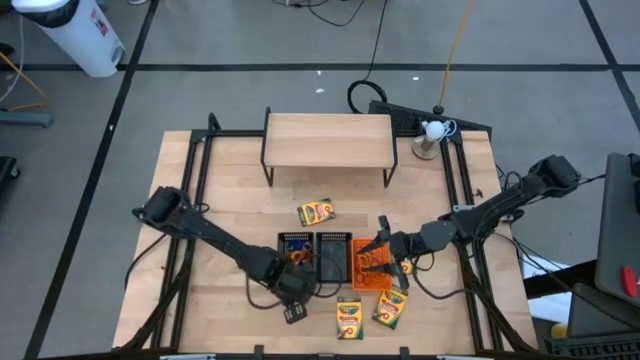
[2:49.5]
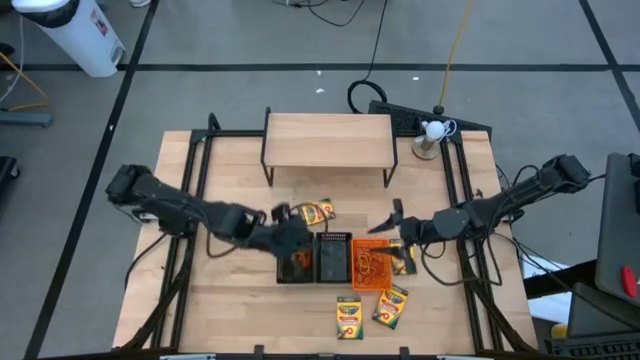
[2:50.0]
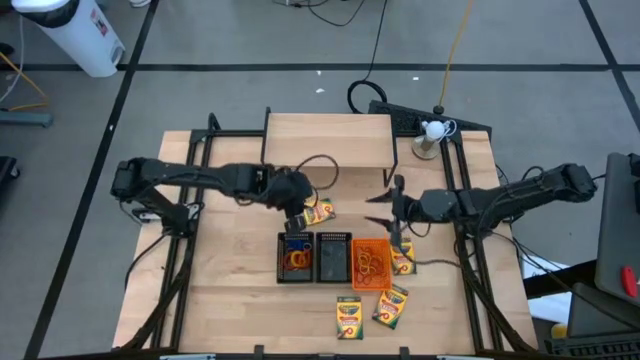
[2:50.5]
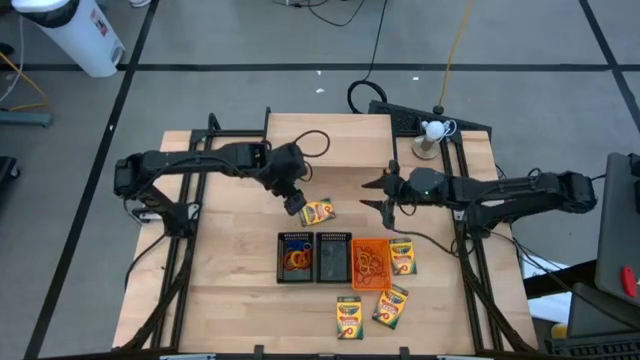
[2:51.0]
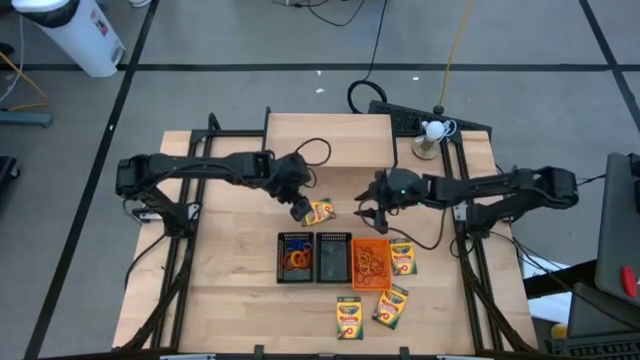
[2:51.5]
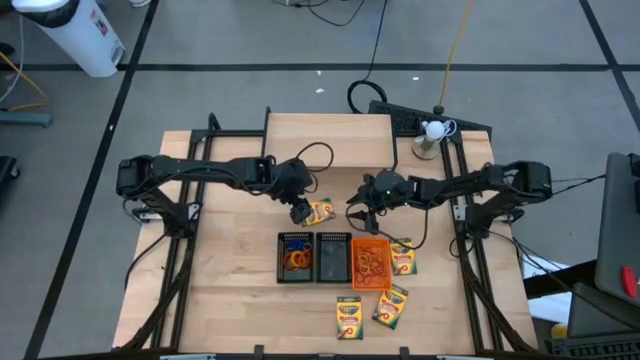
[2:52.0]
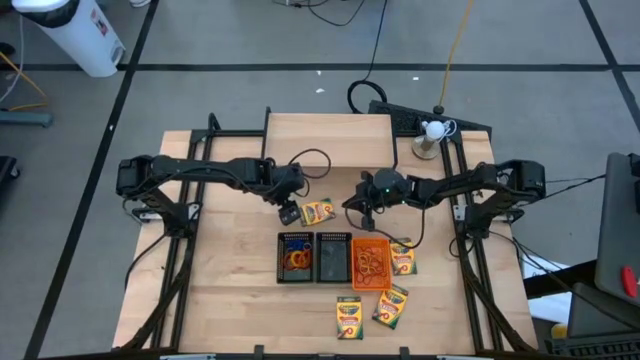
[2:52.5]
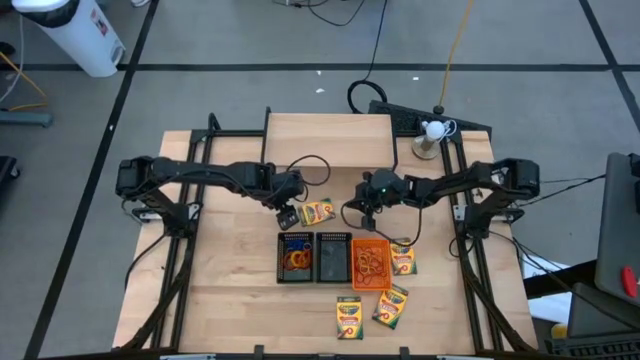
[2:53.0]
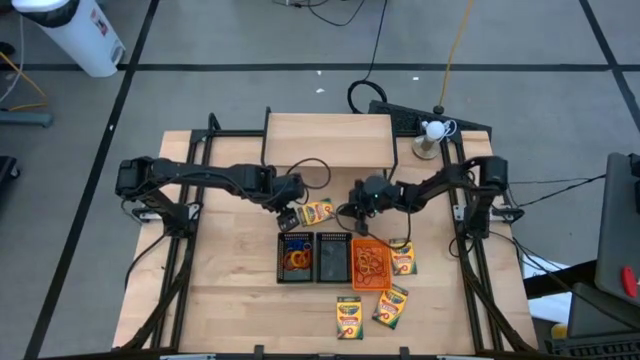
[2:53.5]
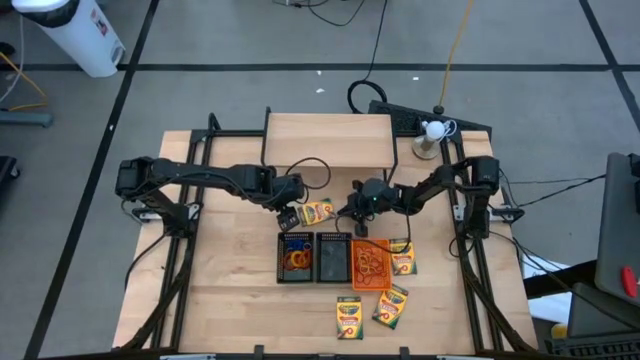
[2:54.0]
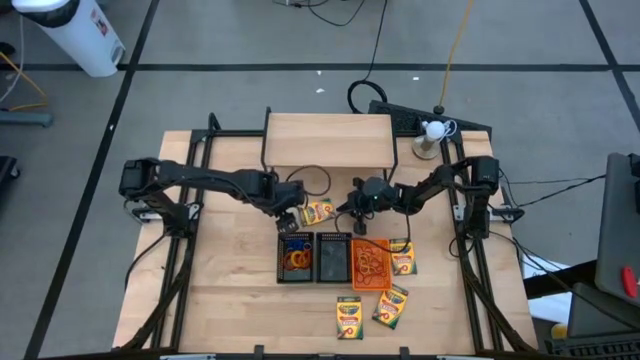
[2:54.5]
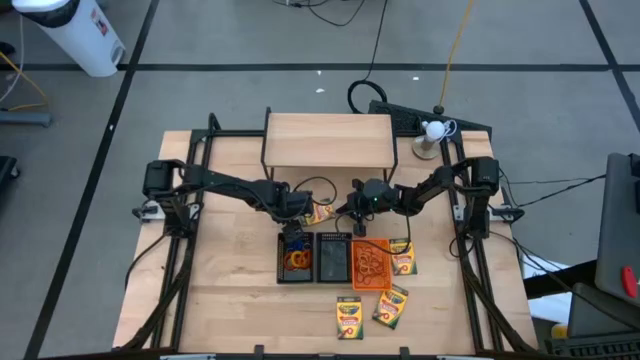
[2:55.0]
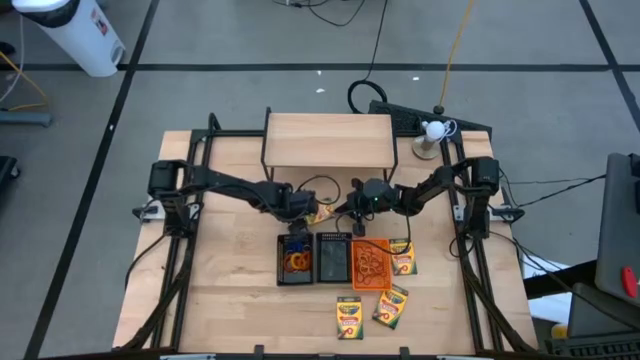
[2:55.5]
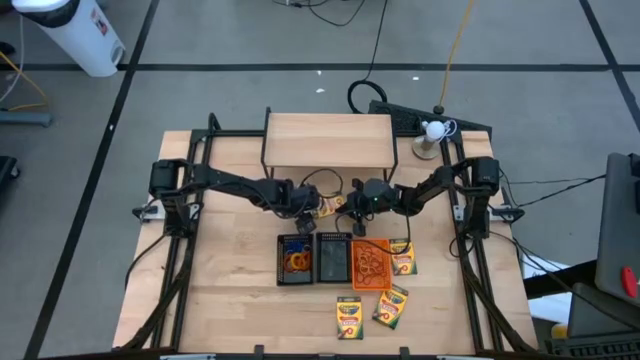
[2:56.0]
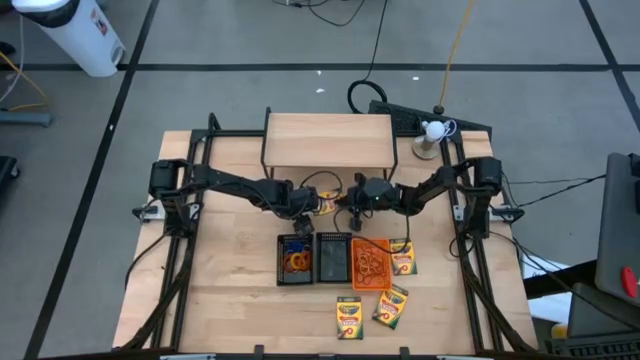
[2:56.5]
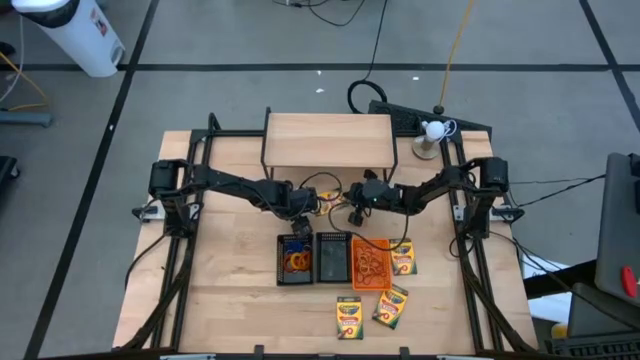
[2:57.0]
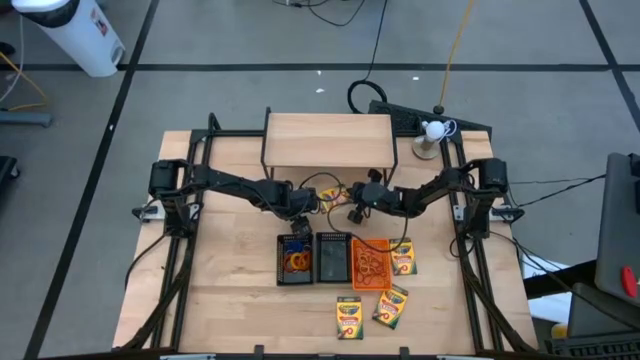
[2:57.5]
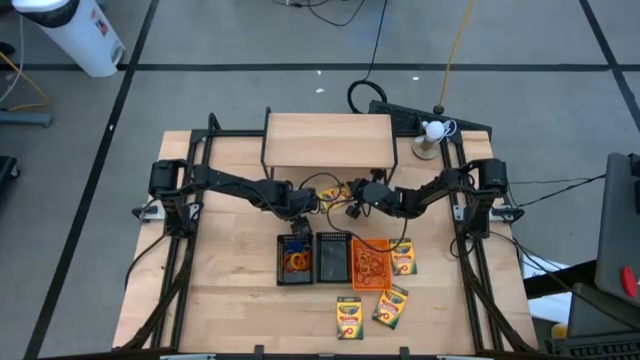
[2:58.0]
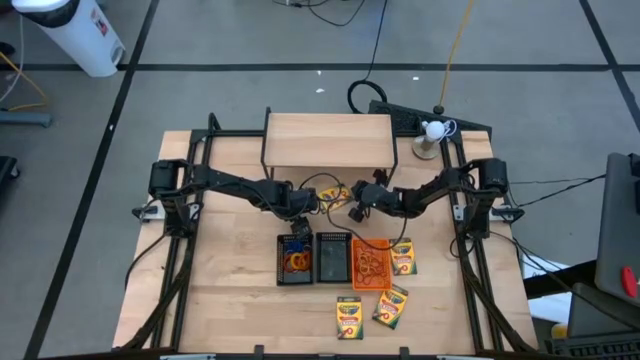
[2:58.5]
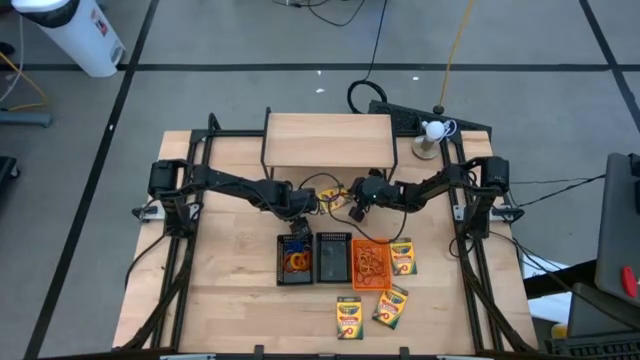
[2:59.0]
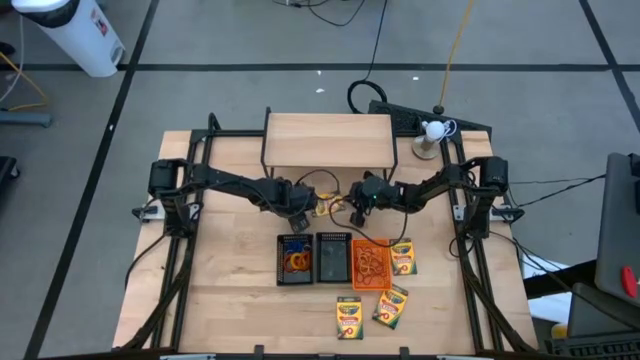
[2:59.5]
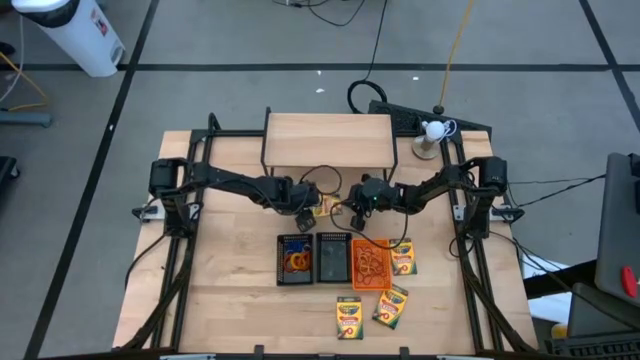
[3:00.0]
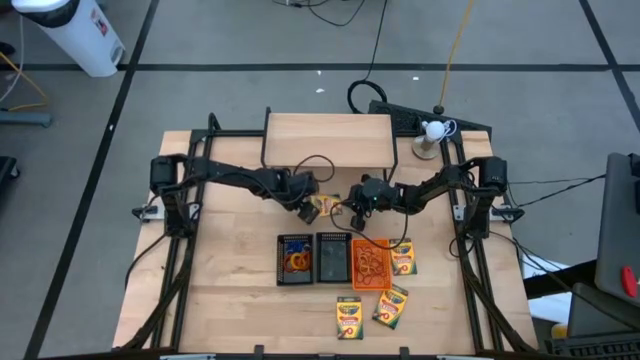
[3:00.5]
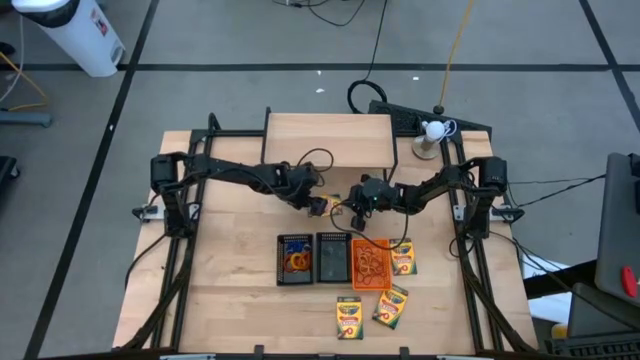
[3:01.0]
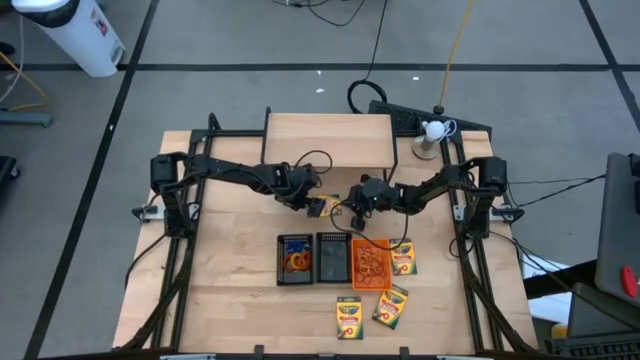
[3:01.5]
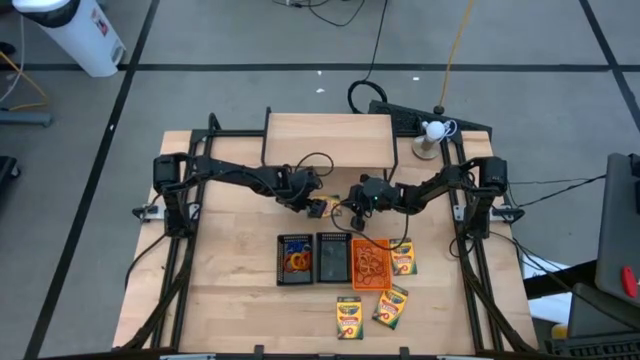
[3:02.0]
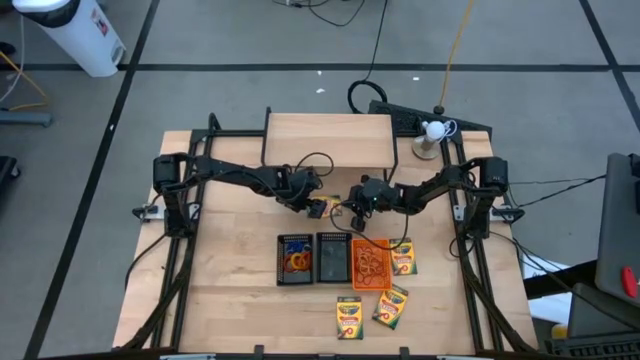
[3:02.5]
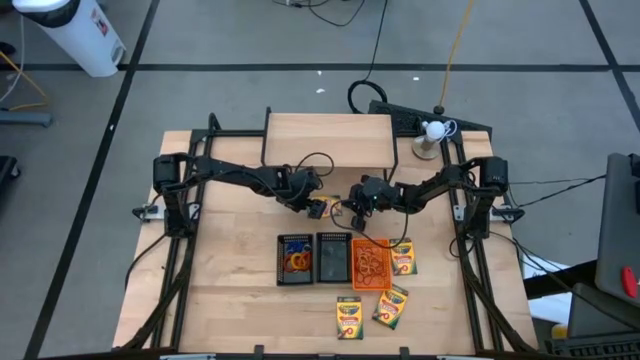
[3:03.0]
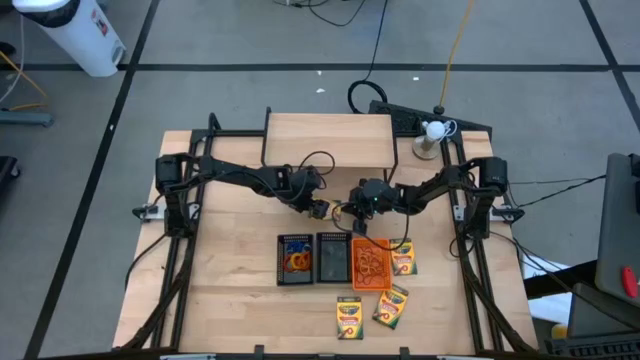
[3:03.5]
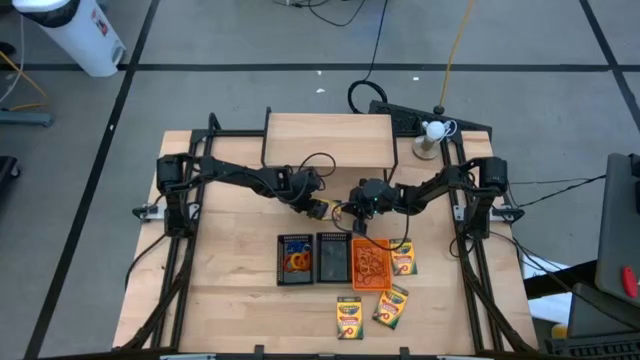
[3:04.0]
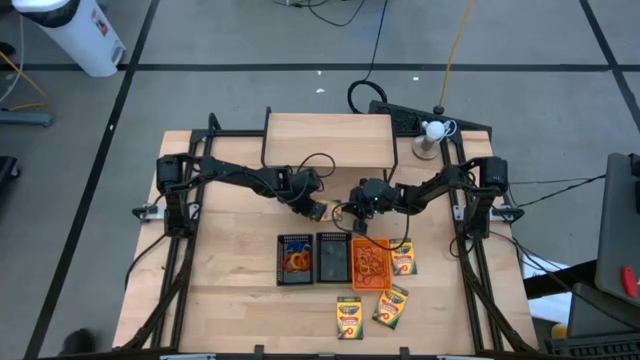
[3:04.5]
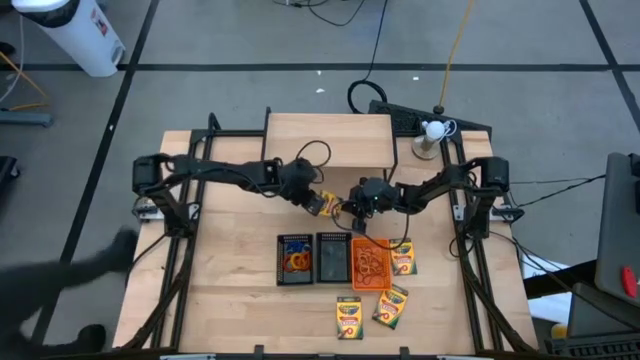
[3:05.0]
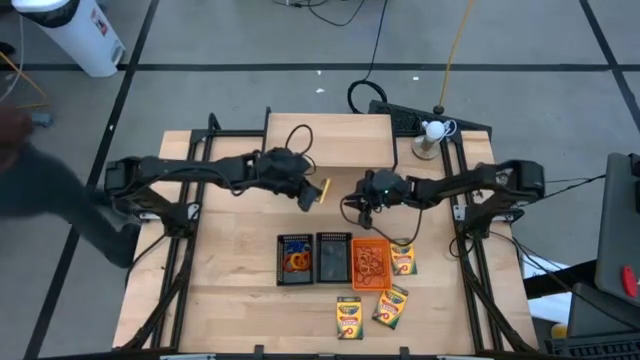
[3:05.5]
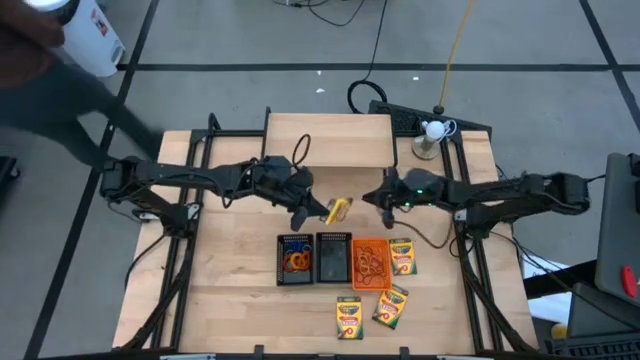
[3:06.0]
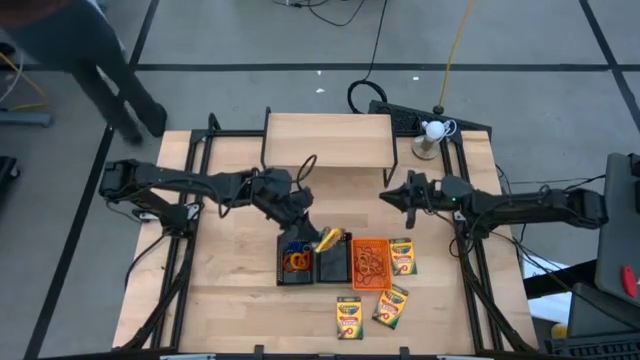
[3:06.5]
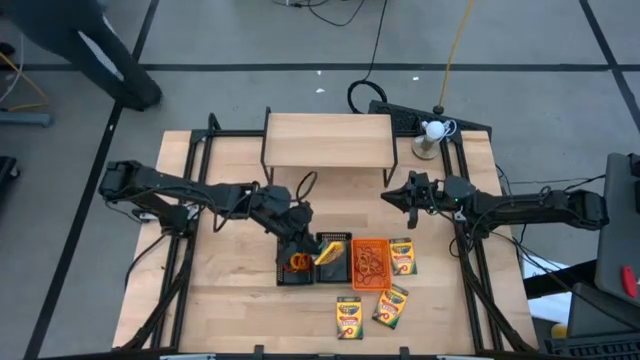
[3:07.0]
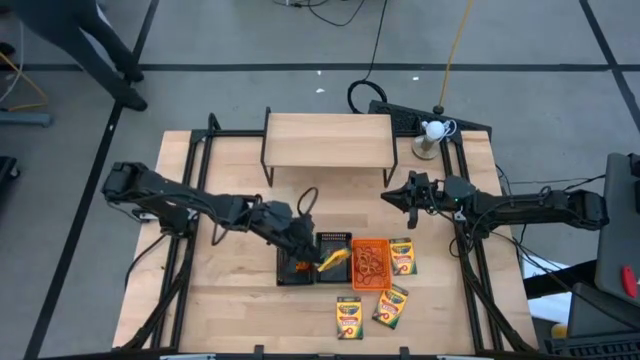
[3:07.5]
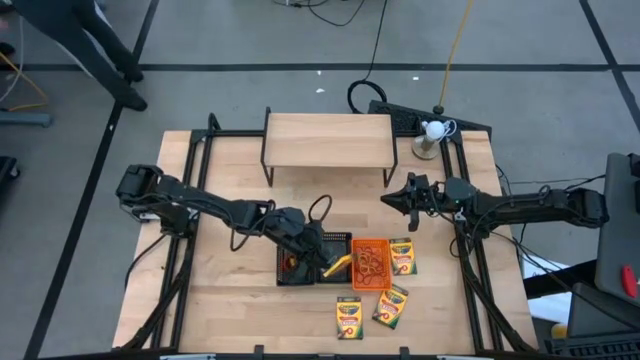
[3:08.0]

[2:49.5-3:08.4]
Task: Pick & Place Office Desk Supplies
Put the crayon box into the right black bin

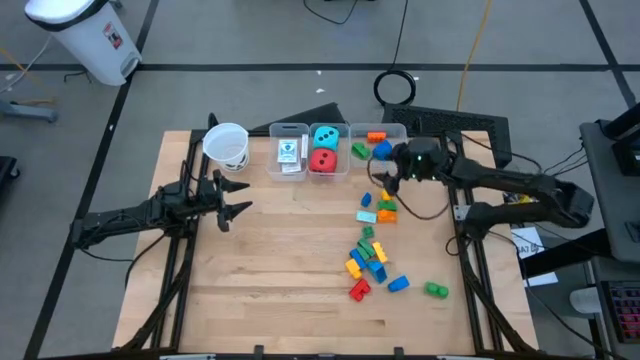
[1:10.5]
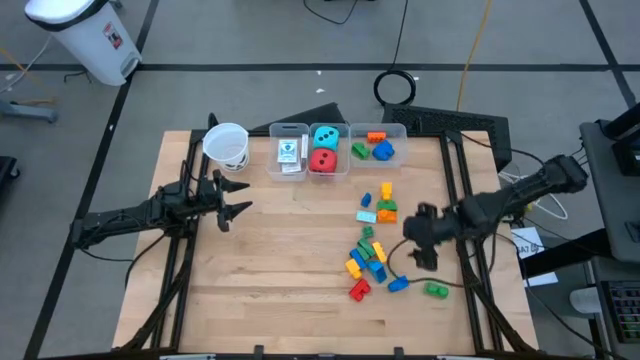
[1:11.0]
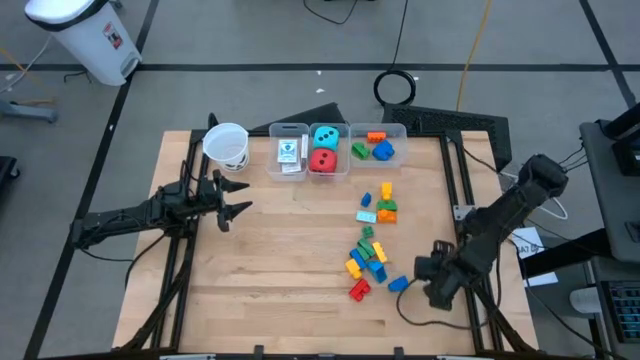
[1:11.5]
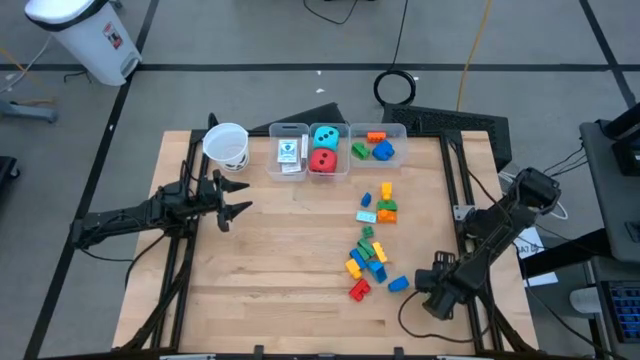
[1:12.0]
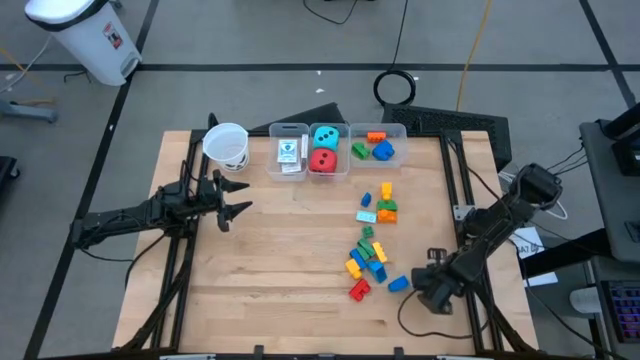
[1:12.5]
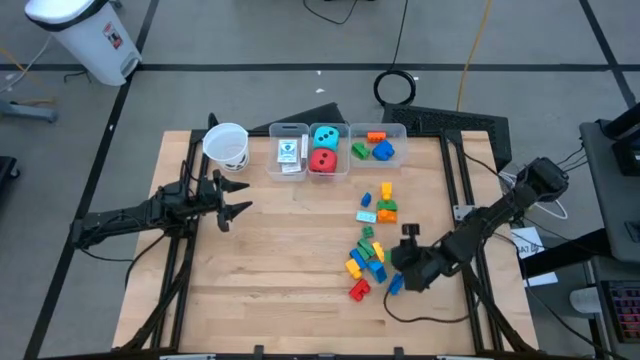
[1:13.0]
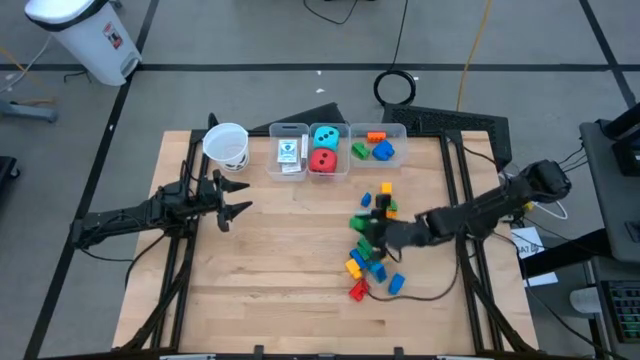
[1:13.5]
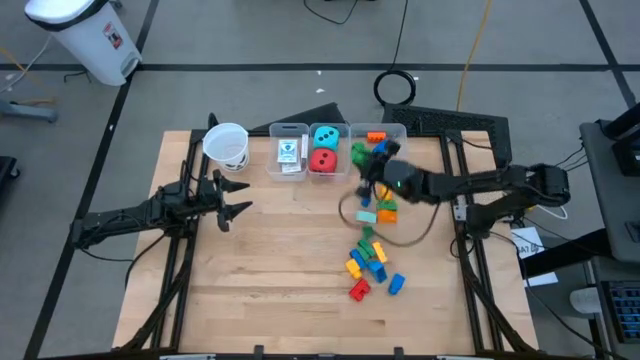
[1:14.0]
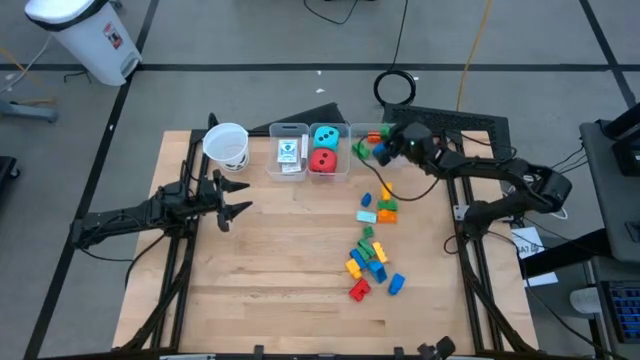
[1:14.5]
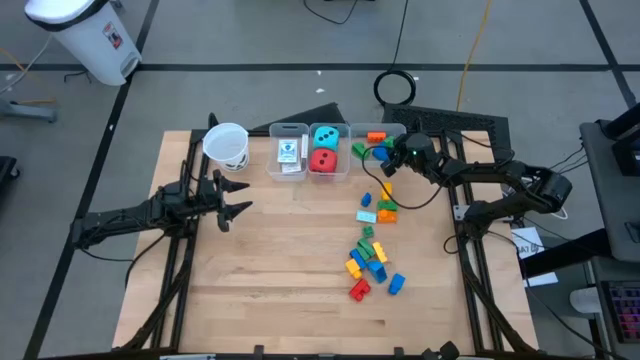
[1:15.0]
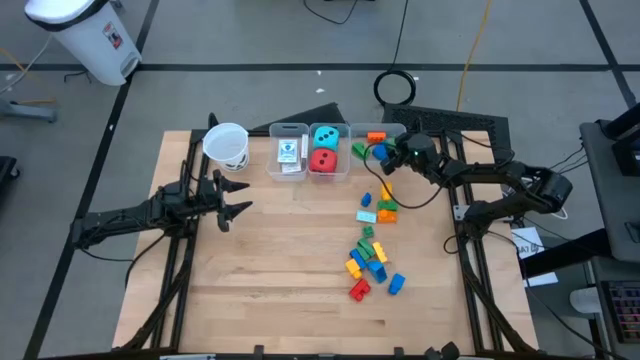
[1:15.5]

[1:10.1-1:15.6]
Task: Pick & Place Toys
Put the green game piece into the right transparent bin
